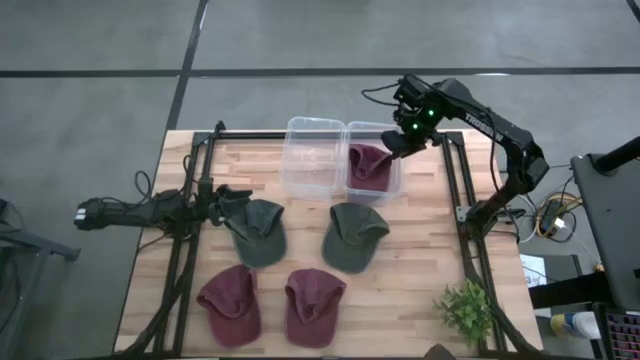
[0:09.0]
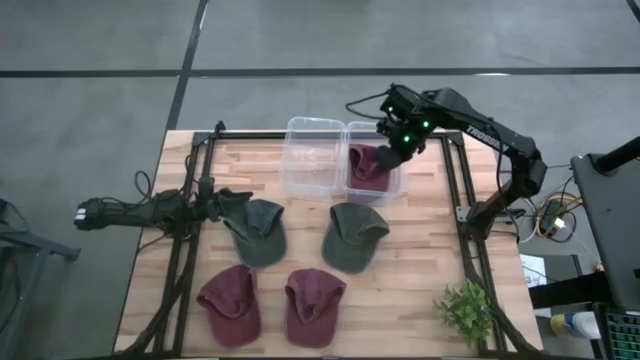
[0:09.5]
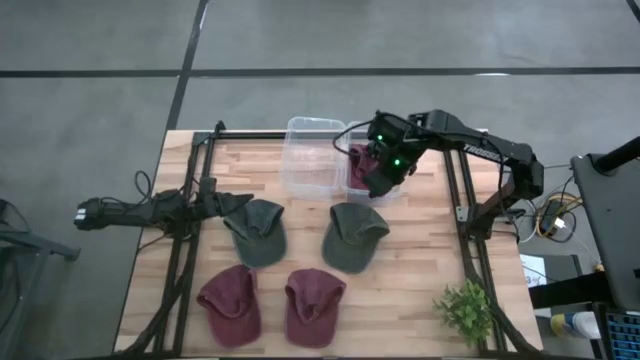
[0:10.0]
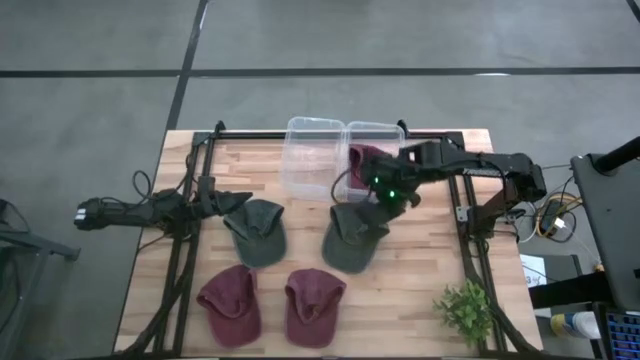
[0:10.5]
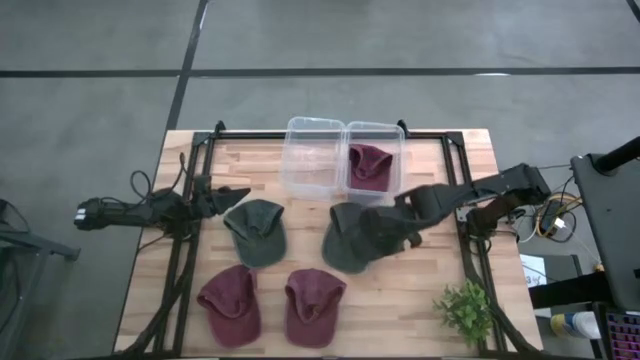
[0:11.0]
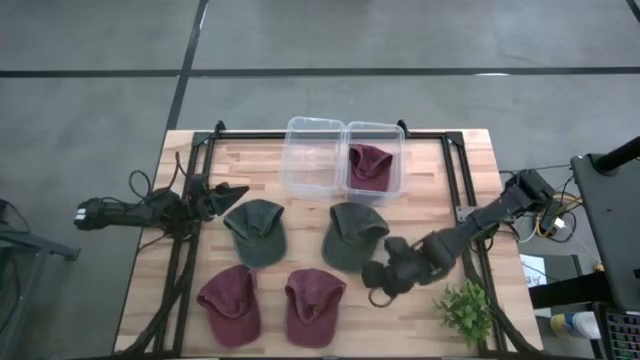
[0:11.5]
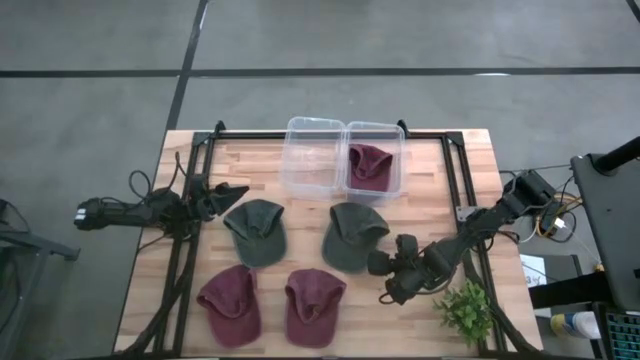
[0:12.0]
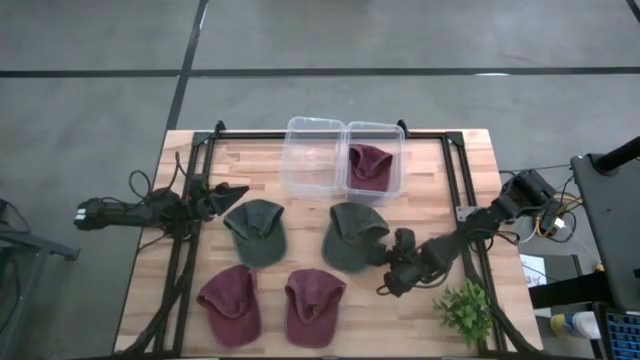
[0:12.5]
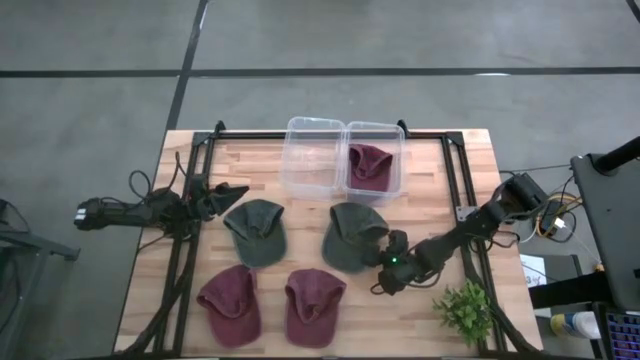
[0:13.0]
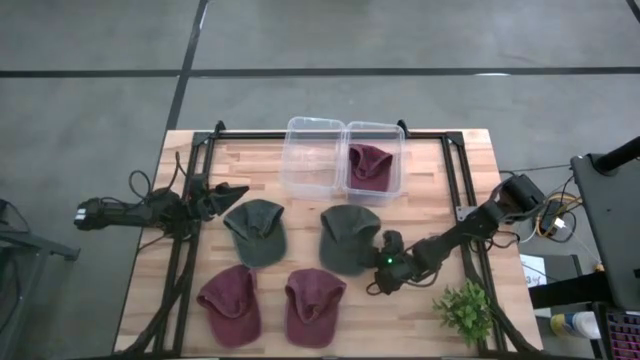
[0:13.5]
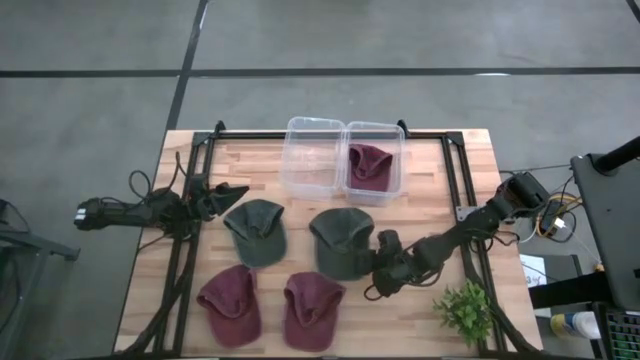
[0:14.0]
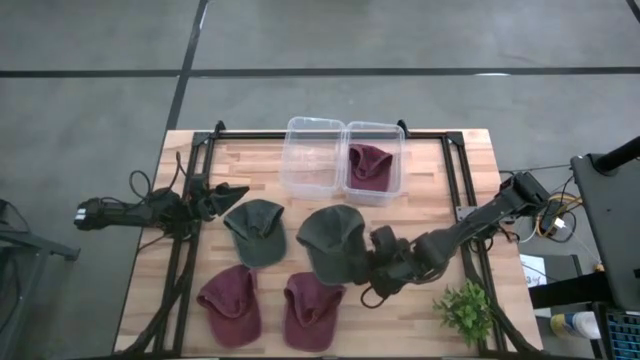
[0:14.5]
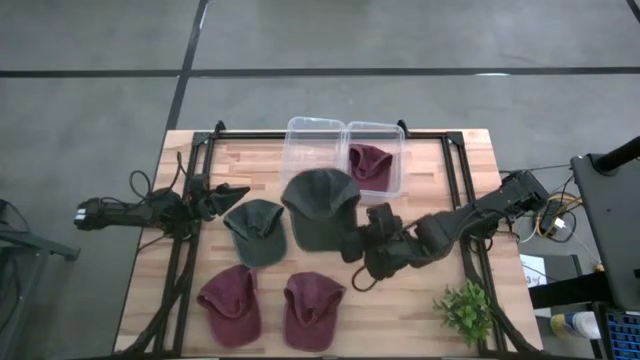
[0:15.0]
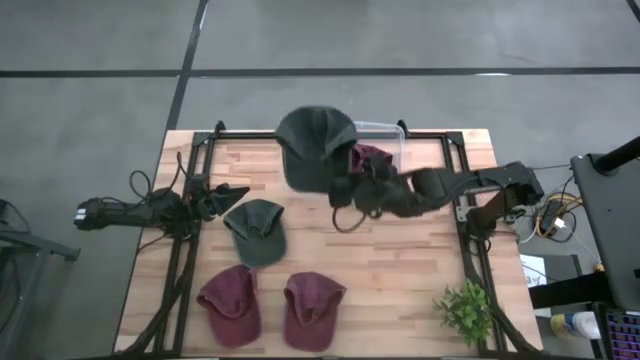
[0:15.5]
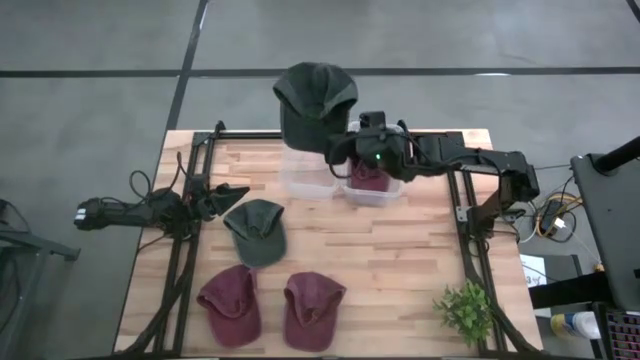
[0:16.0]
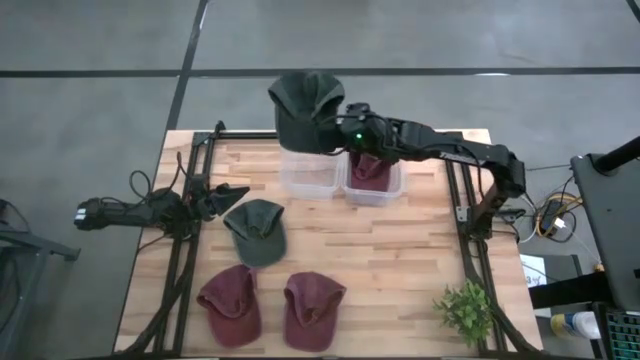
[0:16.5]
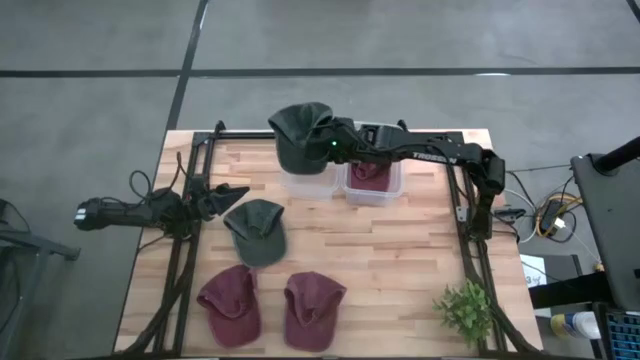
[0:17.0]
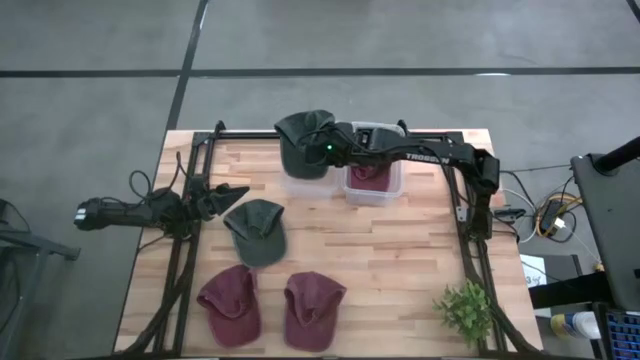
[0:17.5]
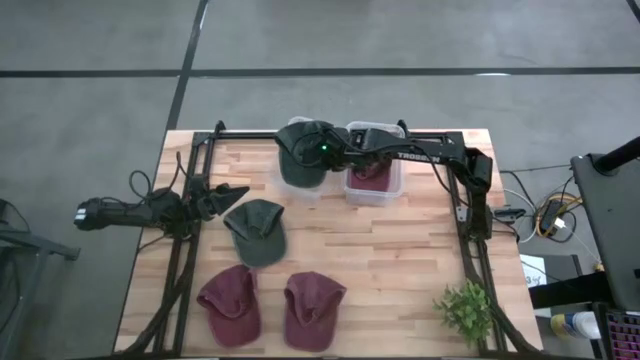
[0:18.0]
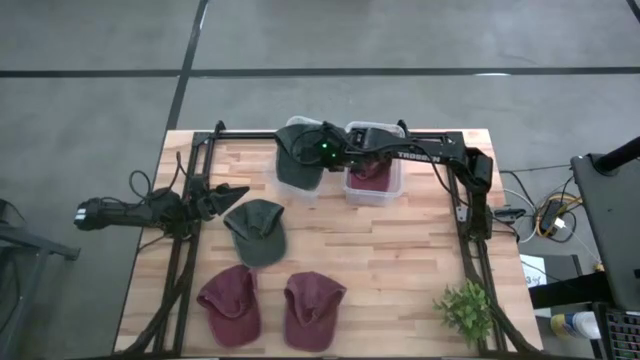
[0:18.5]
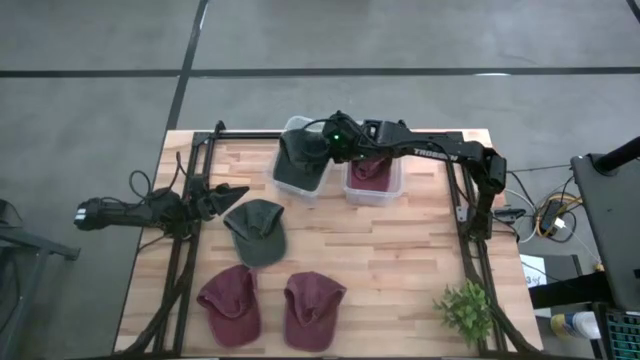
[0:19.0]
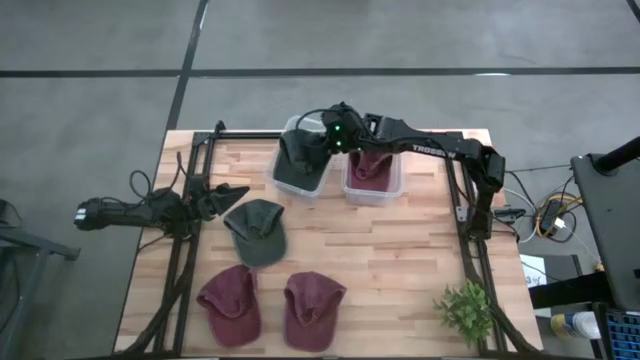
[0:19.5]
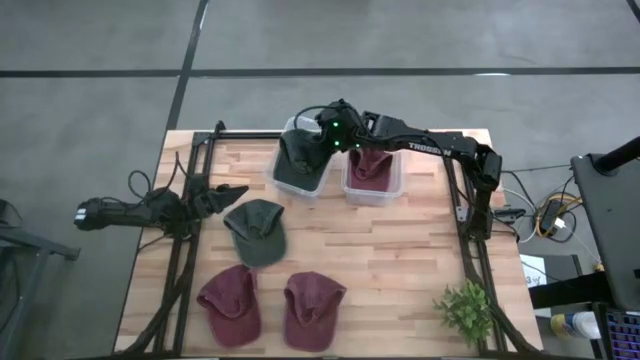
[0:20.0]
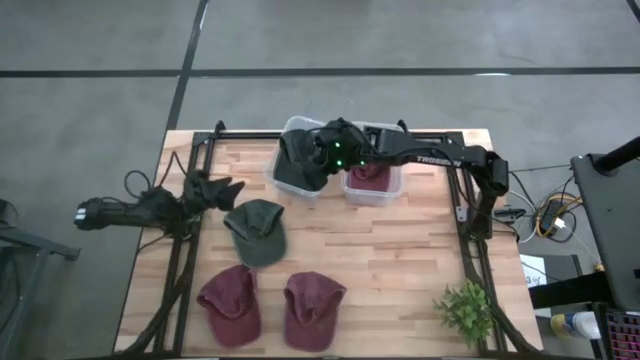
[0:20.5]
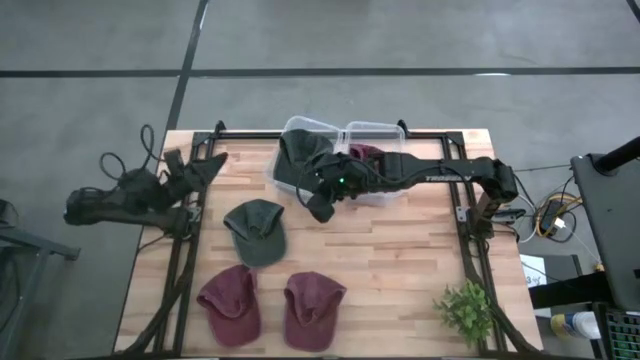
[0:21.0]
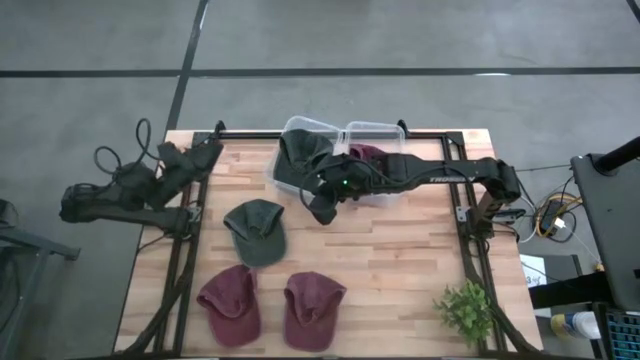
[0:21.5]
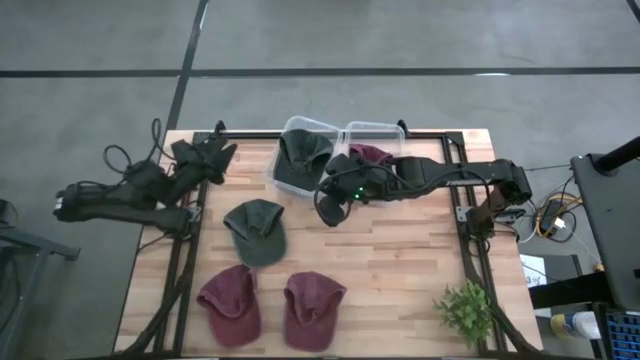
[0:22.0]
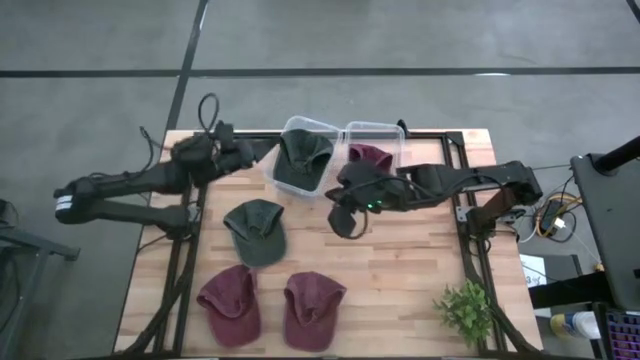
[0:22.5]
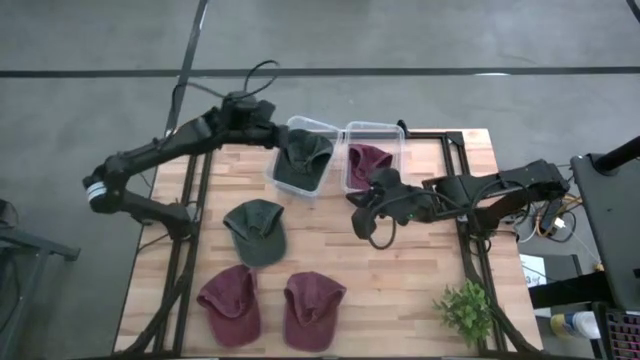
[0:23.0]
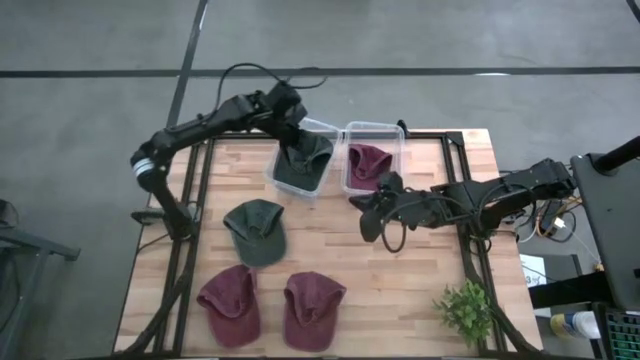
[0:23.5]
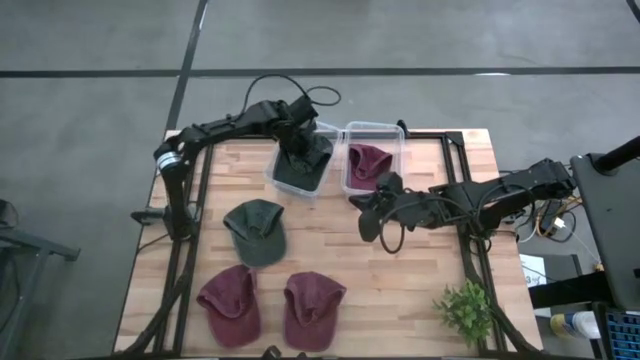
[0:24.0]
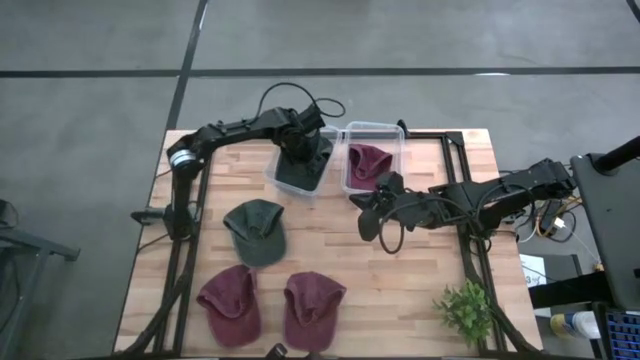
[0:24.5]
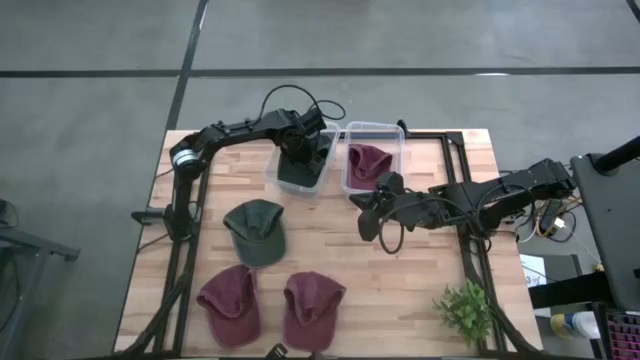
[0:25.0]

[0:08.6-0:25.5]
Task: Pick & Place hat
Put the right black cap into the left transparent bin

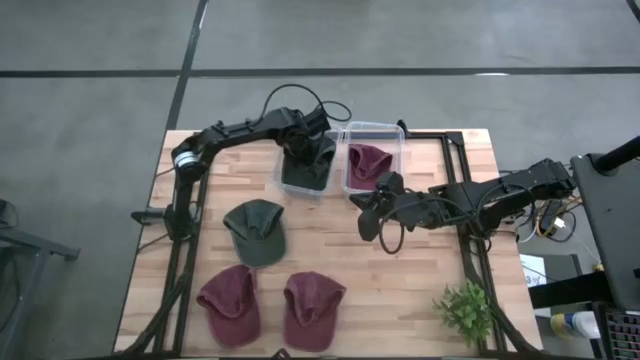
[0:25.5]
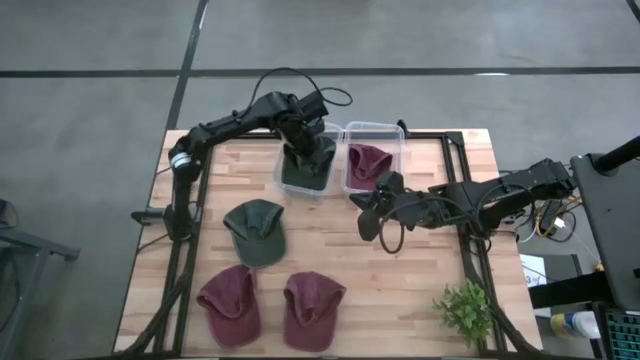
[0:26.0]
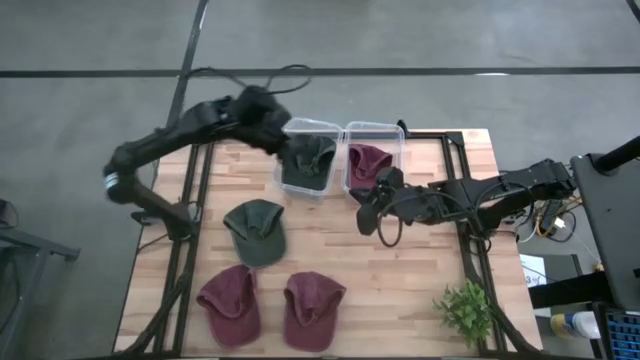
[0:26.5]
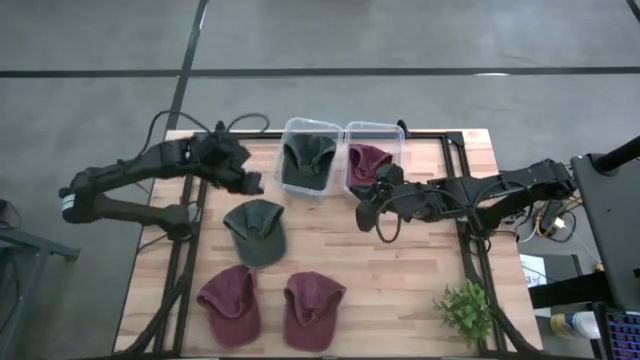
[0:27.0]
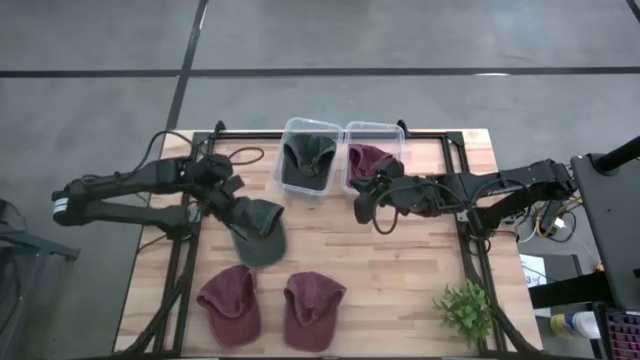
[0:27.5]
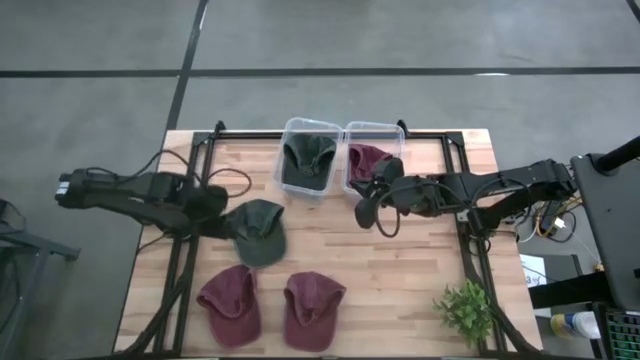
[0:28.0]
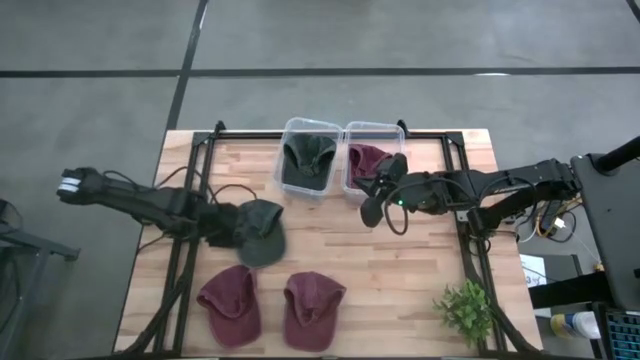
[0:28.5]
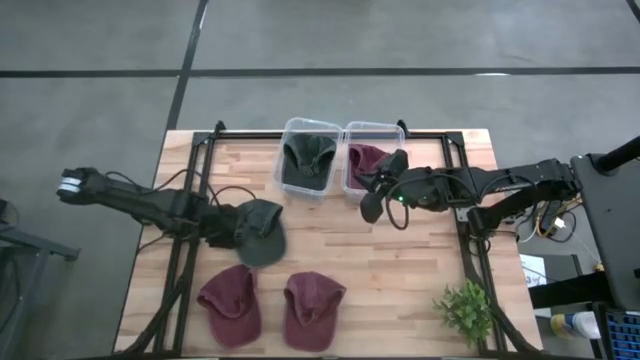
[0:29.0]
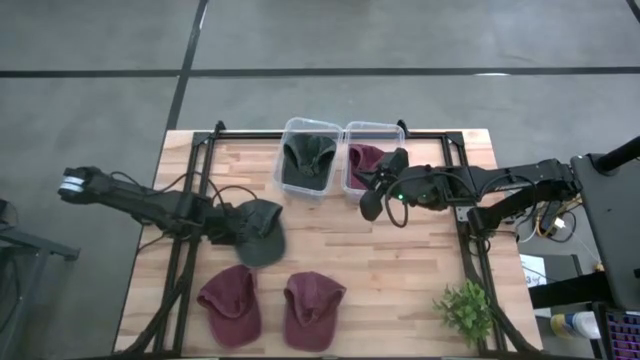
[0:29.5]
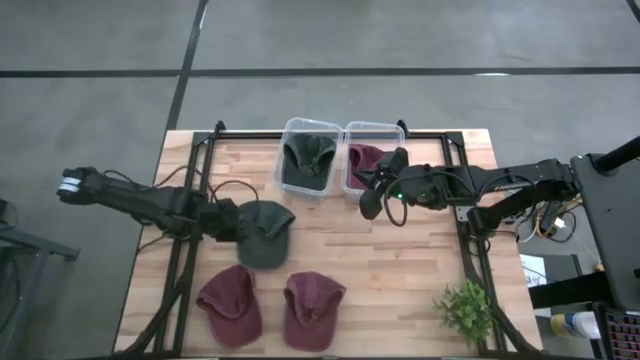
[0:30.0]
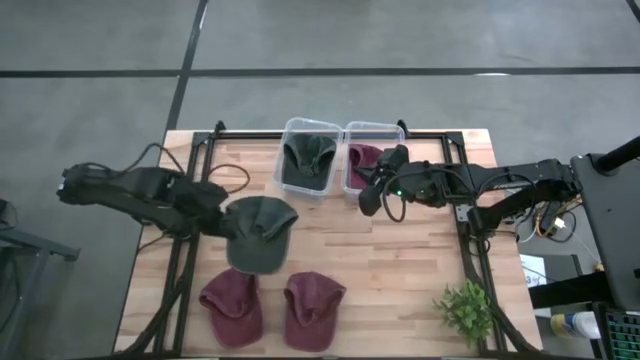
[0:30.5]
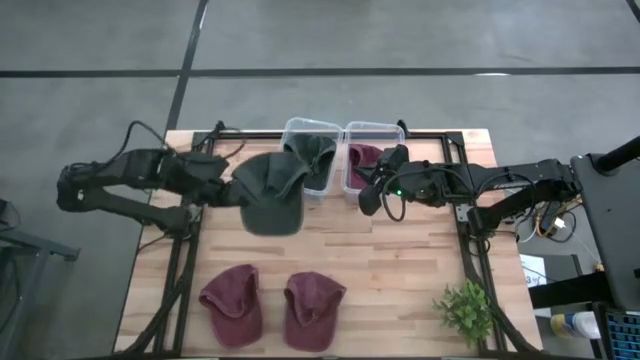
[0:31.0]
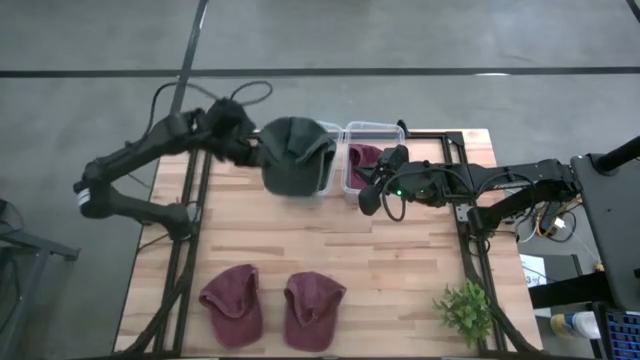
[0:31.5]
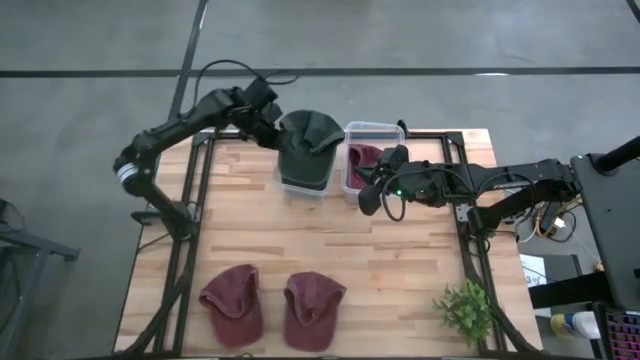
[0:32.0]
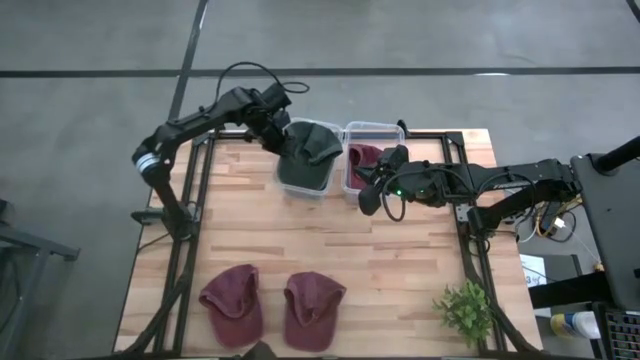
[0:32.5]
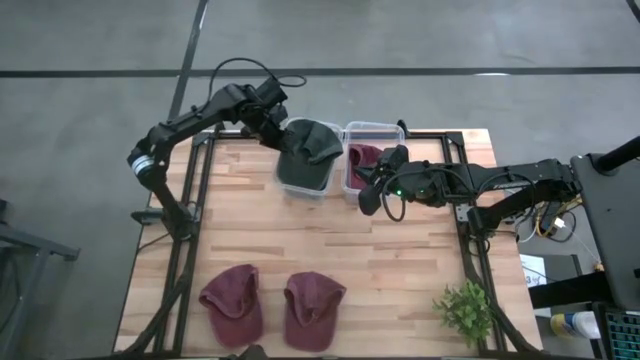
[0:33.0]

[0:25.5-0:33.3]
Put the black cap into the left transparent bin
